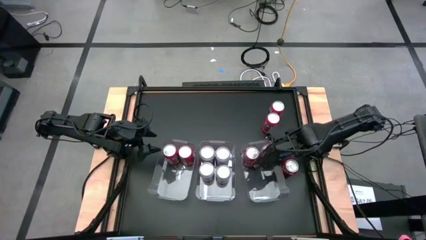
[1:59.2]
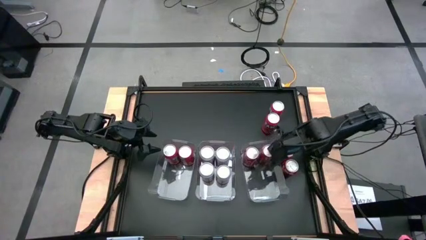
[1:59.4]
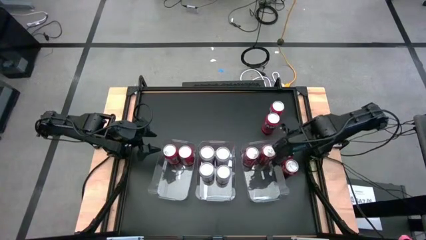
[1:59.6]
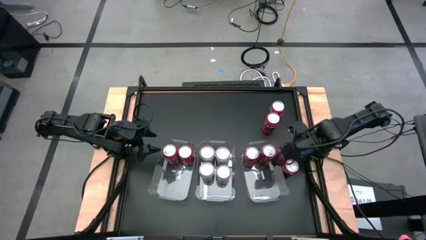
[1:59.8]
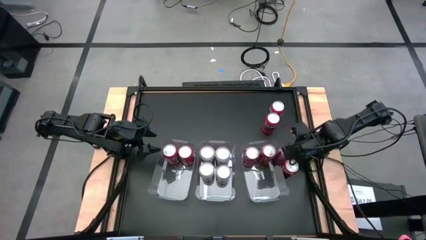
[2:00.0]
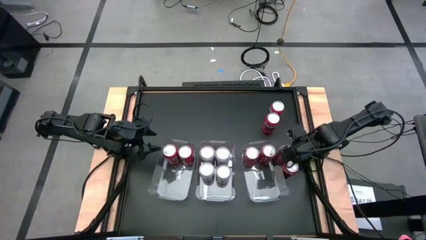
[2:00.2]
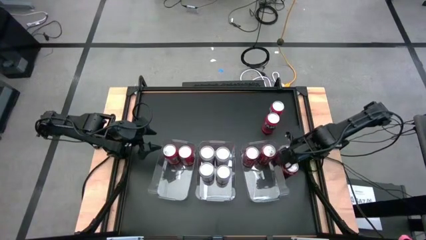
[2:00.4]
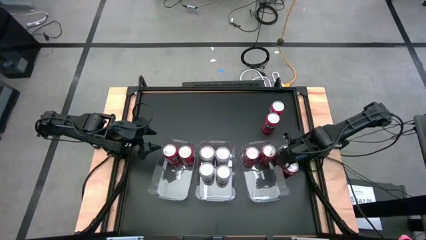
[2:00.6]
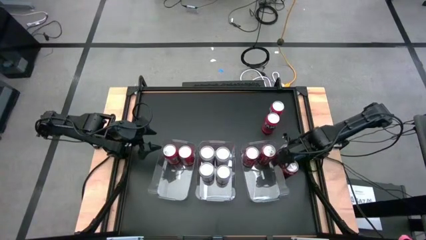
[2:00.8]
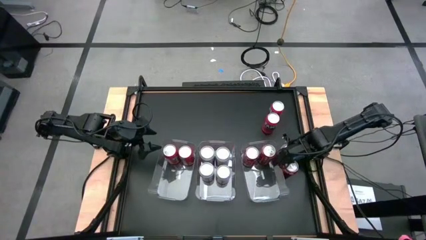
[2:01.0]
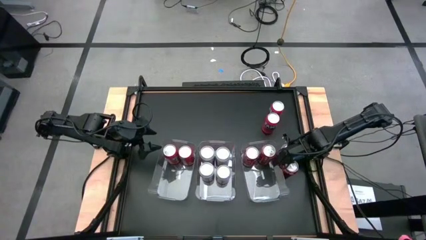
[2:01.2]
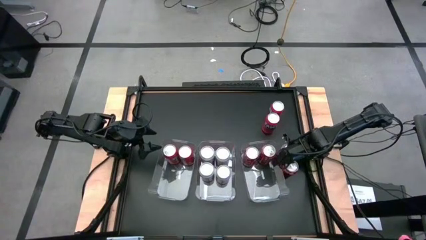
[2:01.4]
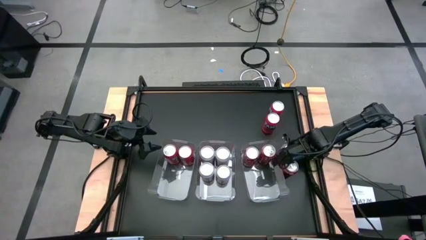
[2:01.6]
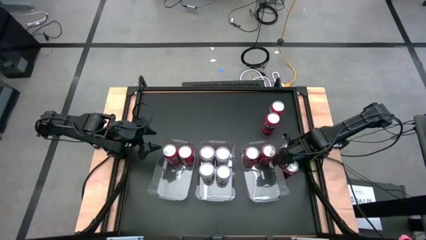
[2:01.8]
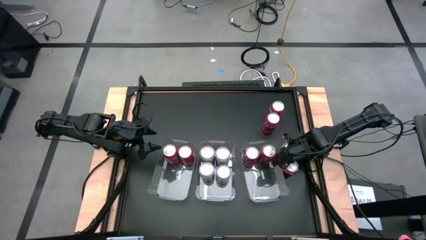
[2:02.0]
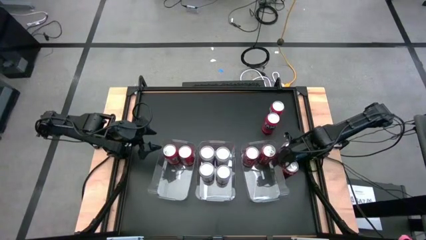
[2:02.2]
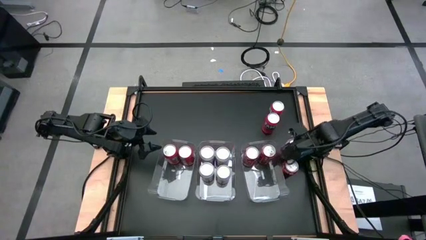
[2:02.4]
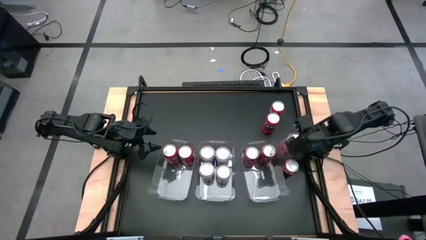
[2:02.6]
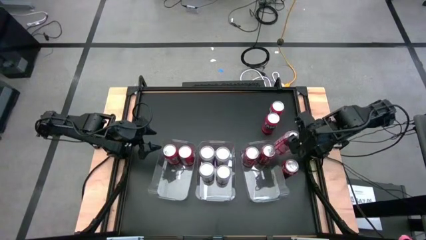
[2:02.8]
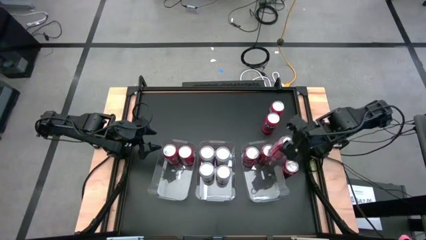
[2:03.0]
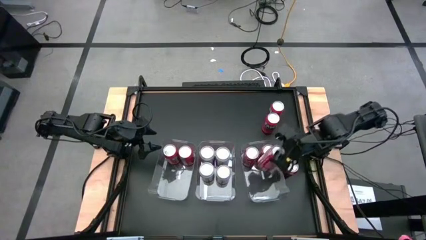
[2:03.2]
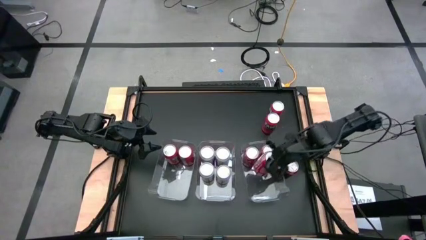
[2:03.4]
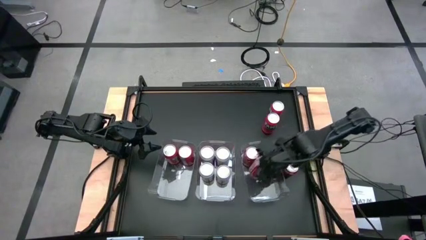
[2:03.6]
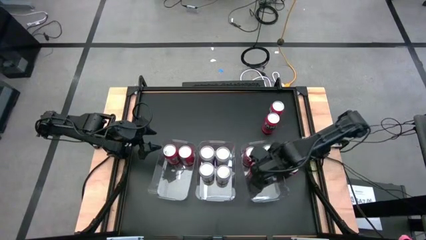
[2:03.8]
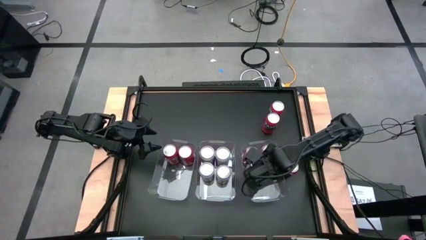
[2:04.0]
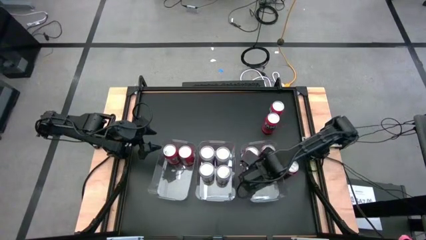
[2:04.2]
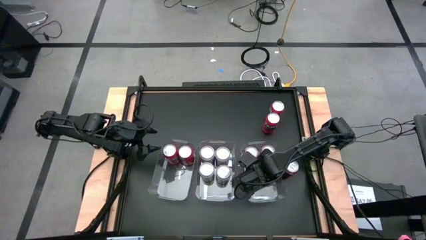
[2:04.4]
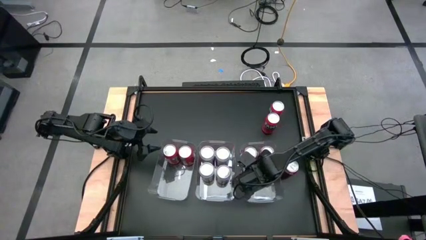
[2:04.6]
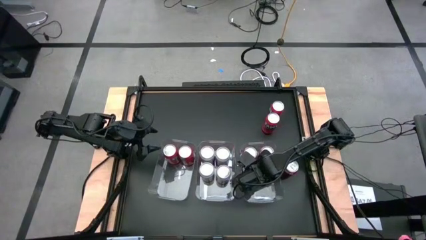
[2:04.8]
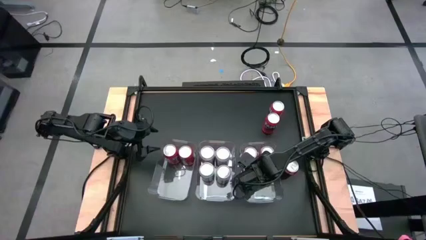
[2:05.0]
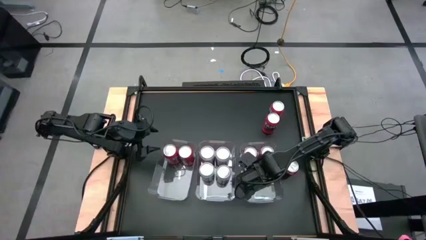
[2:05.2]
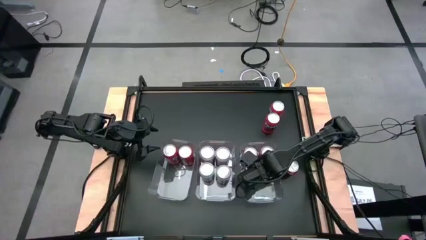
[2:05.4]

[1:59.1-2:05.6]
Task: Sort soda cans
Put the red soda can into the right transparent bin

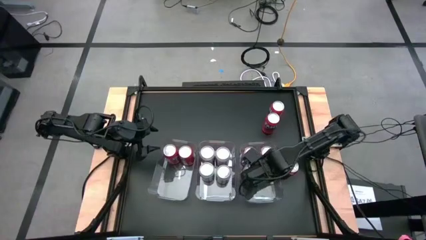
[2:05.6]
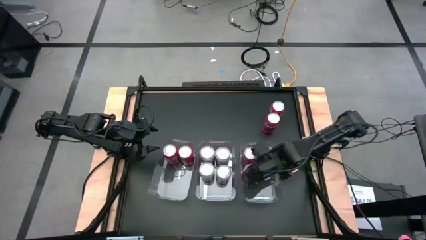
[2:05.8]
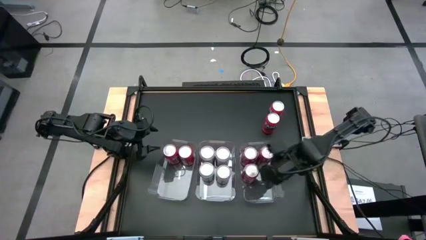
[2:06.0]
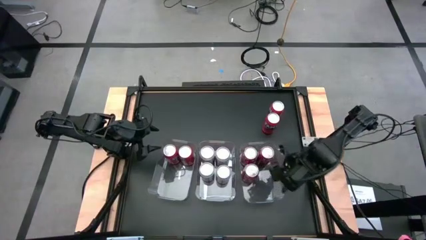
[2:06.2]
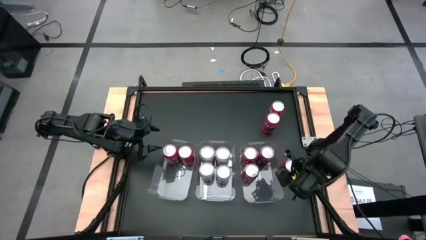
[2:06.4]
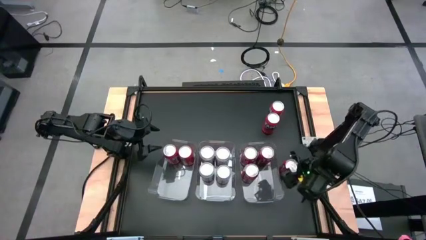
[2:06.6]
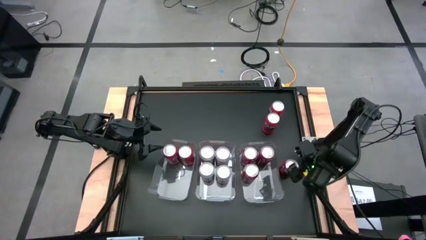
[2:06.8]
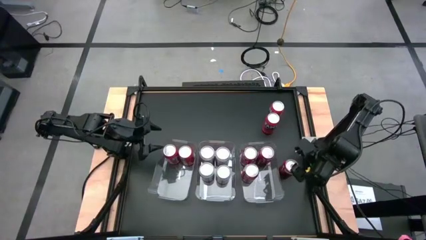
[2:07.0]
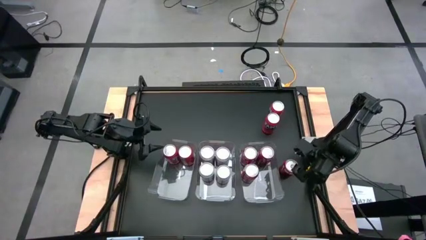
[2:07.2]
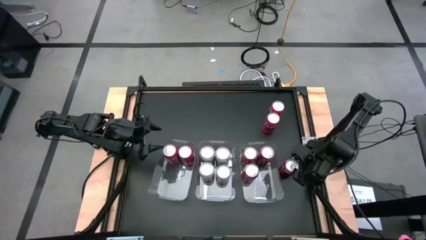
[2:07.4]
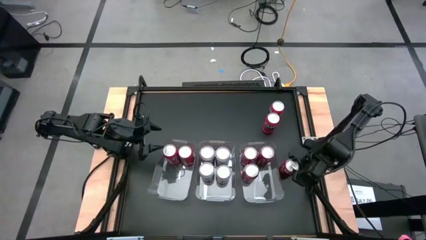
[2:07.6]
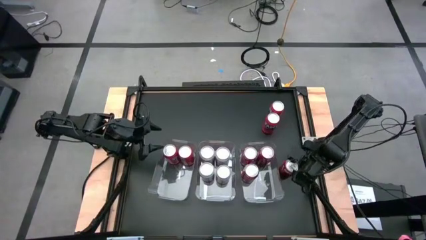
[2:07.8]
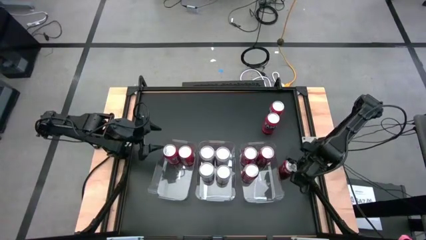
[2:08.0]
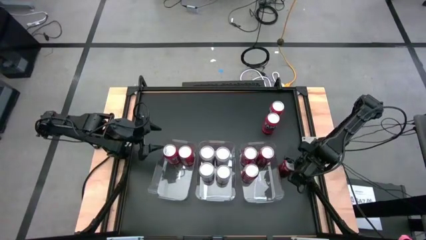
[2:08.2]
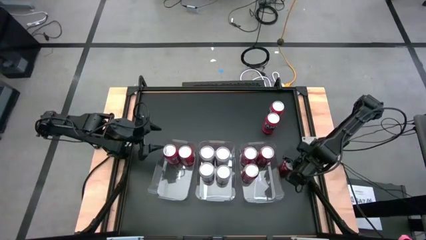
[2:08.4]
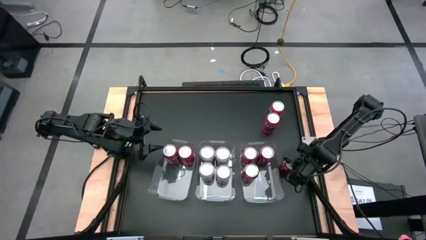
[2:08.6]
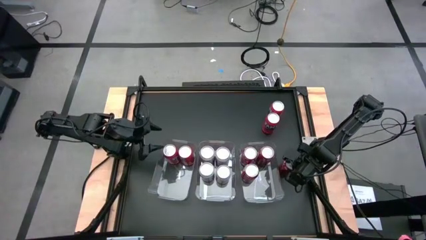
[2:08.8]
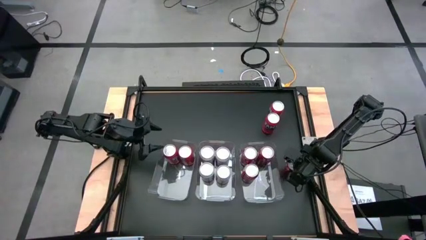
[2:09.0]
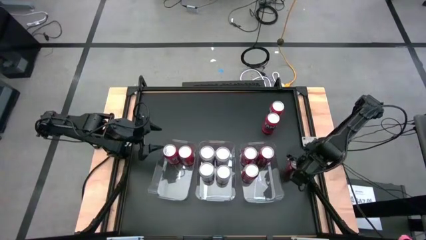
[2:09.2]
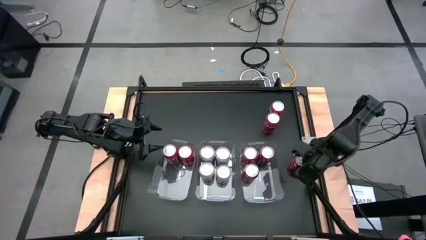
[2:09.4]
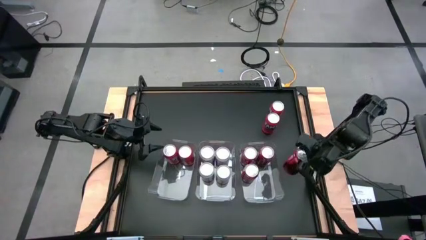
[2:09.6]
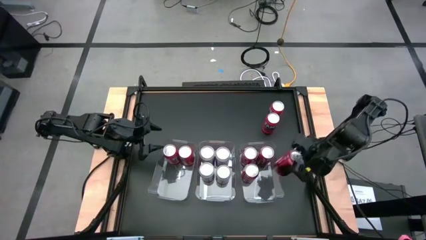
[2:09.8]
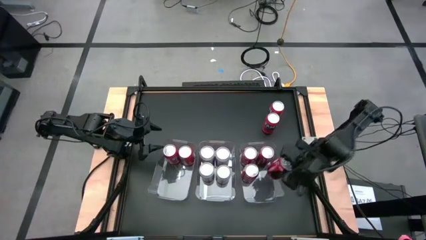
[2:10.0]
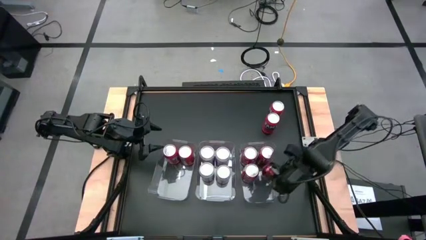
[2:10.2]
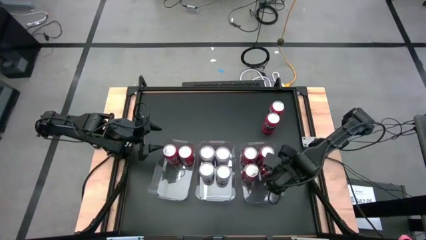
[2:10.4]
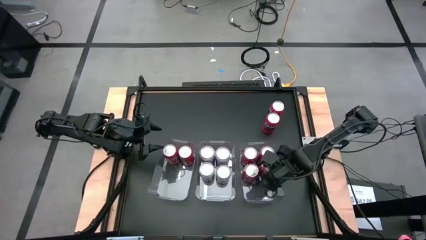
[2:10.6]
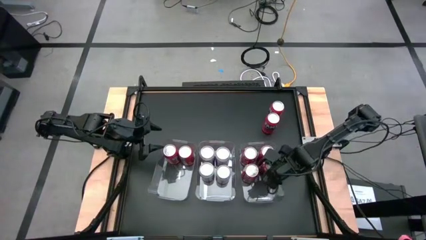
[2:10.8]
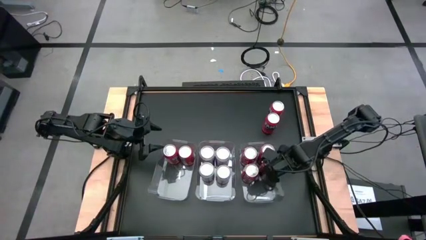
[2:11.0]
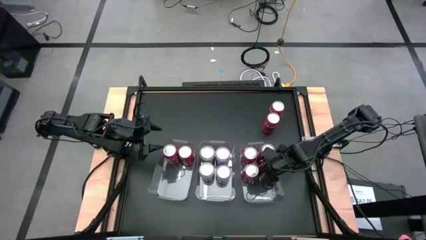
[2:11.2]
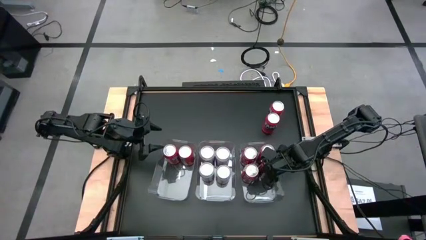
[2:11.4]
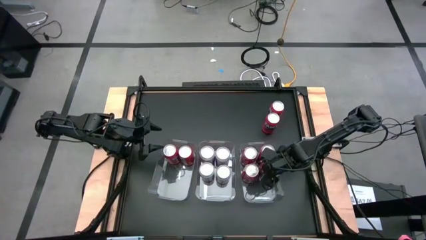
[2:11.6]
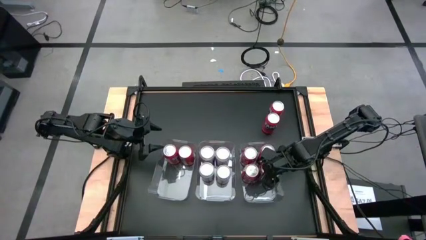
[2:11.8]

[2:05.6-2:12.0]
Put the red soda can into the right transparent bin

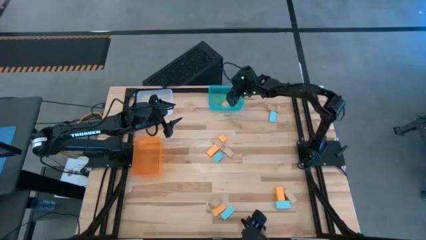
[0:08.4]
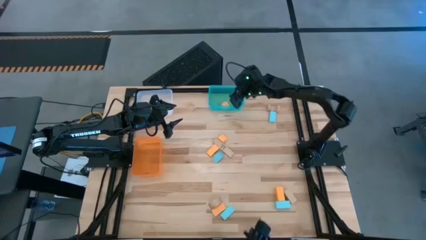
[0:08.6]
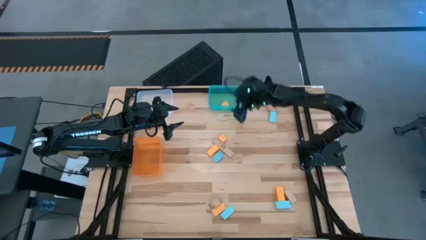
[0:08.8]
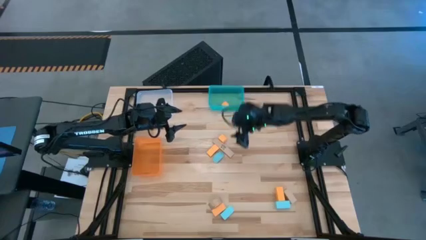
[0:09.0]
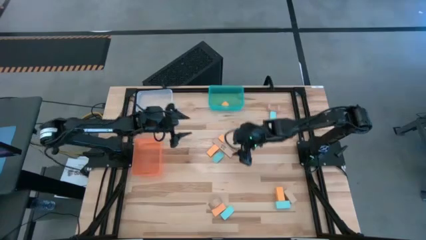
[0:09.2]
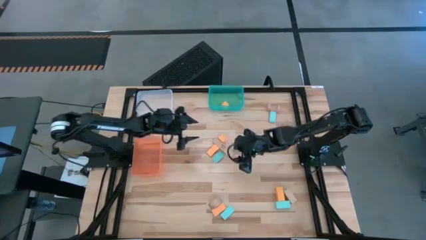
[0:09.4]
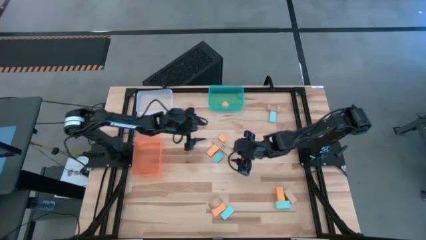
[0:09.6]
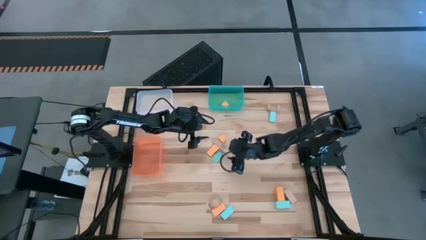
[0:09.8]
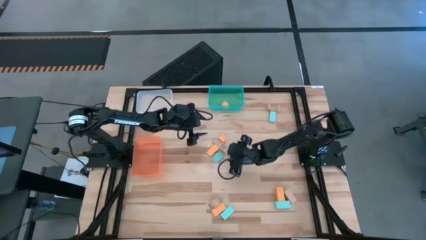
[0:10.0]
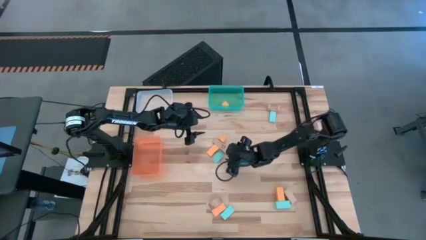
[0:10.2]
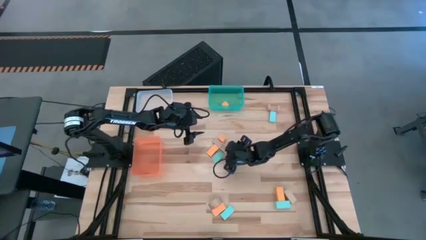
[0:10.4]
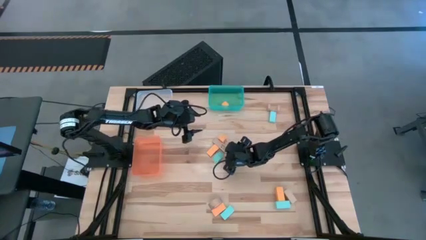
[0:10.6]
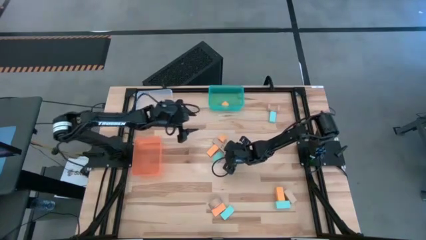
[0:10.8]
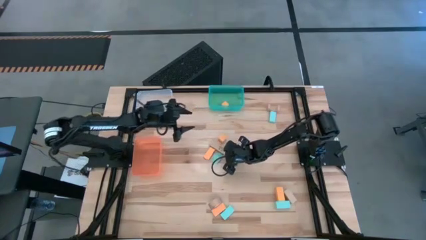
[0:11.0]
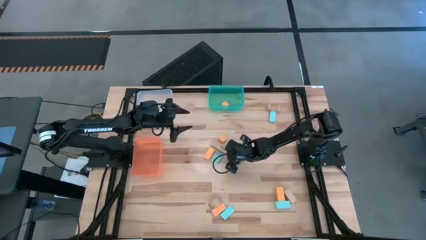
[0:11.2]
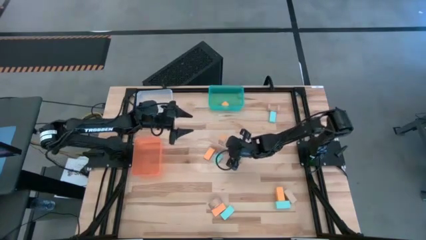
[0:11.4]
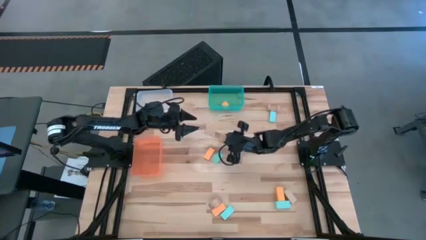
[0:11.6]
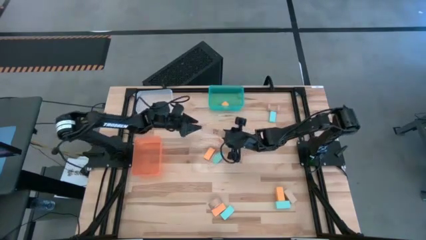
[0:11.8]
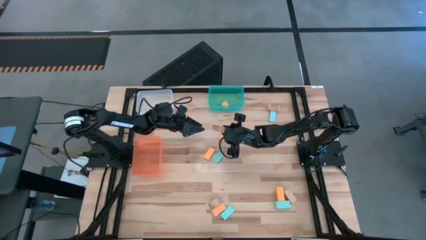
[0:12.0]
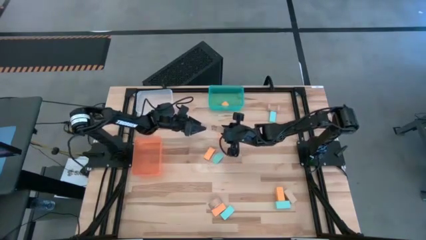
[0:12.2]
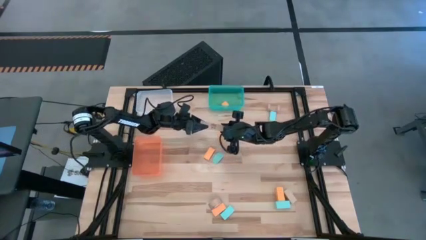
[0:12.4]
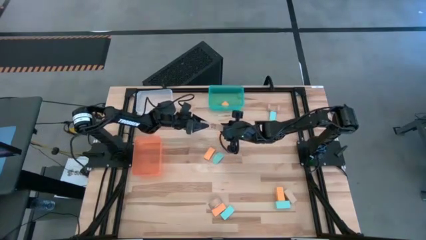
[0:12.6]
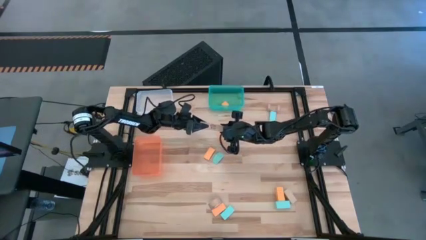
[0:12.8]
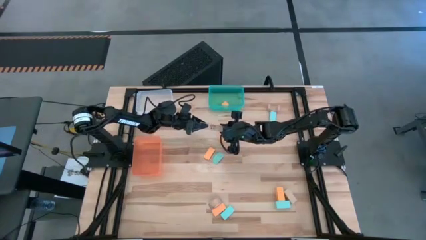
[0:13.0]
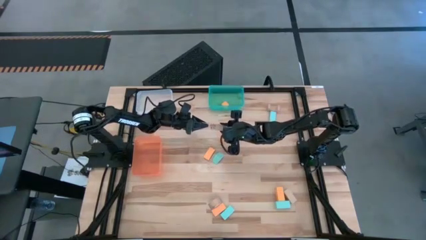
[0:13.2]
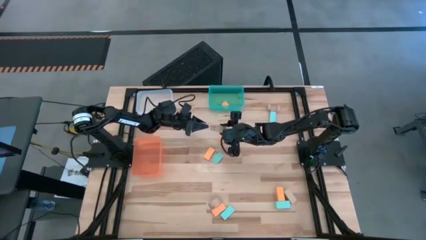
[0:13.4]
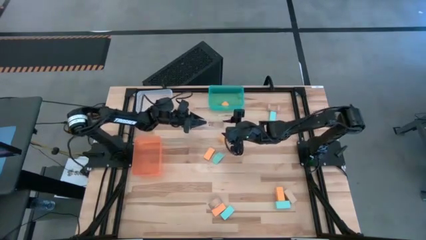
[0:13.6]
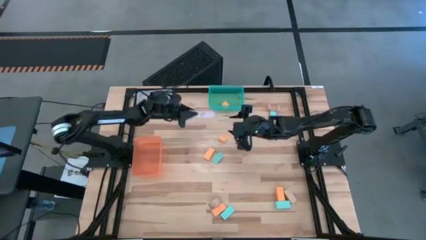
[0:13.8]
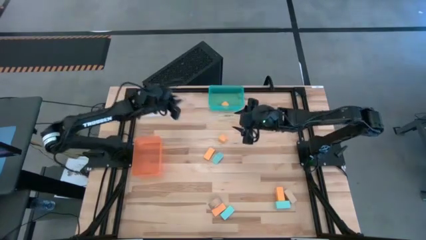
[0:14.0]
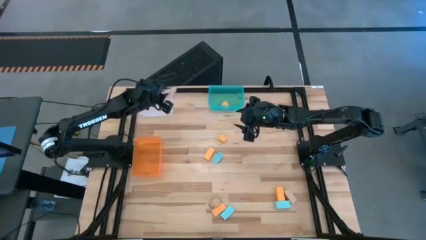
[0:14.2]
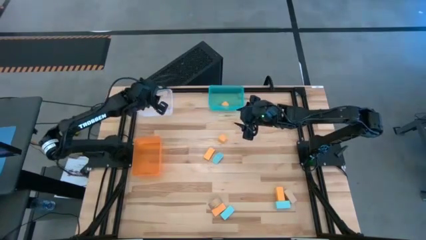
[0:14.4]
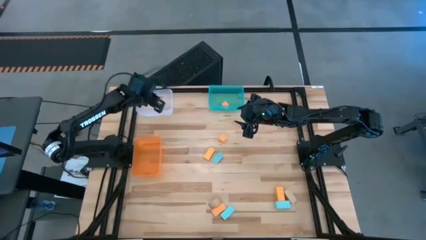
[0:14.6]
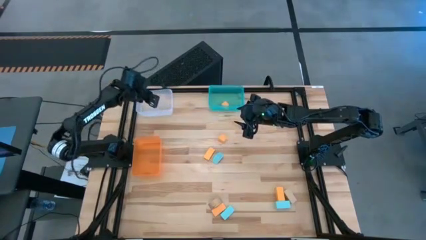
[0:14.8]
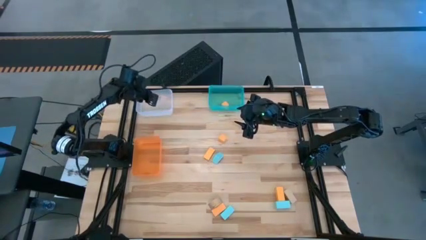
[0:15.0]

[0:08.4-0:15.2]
Task: Sort & place blocks by color
Put the light brown block into the white bin
